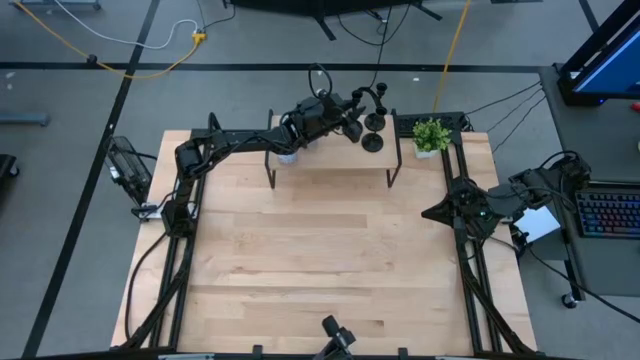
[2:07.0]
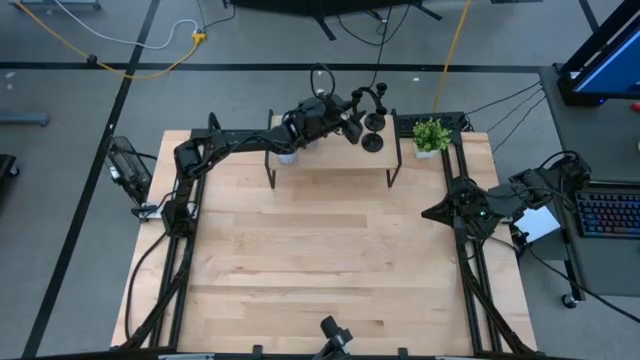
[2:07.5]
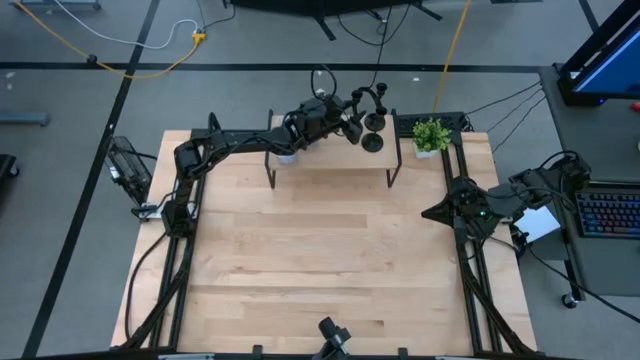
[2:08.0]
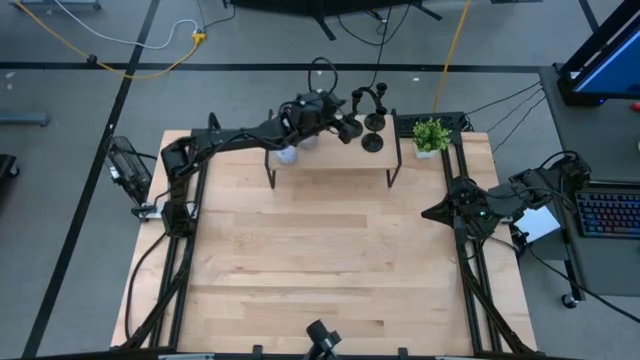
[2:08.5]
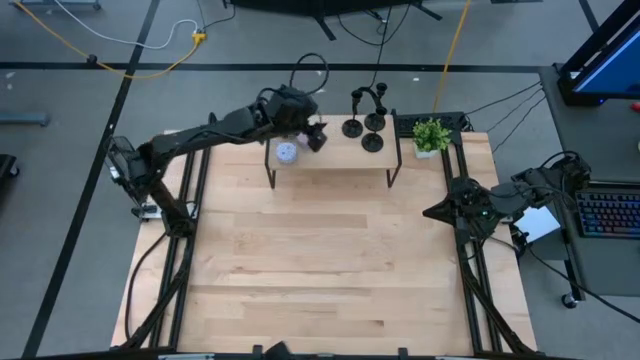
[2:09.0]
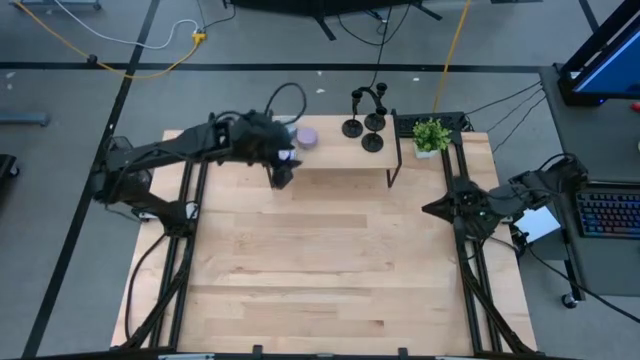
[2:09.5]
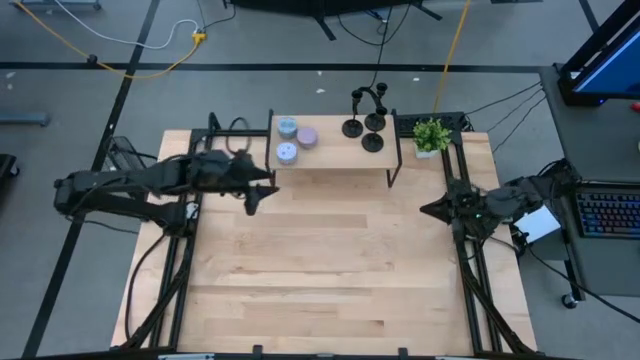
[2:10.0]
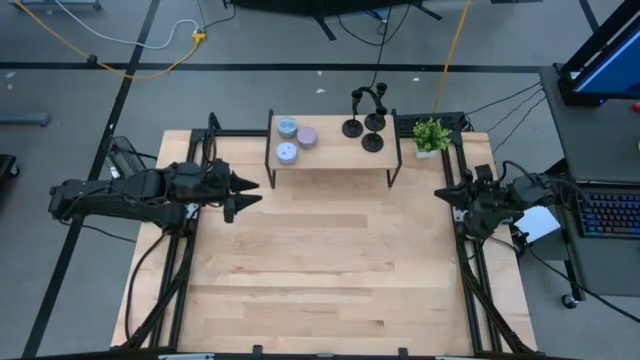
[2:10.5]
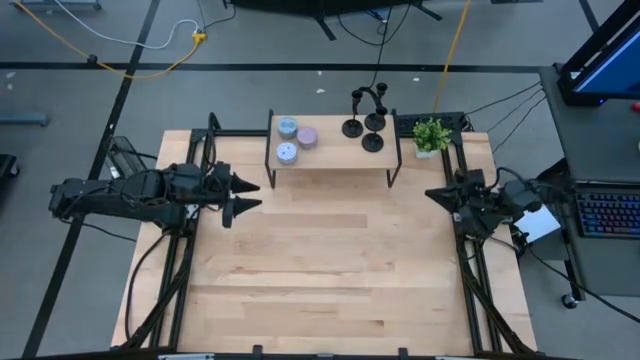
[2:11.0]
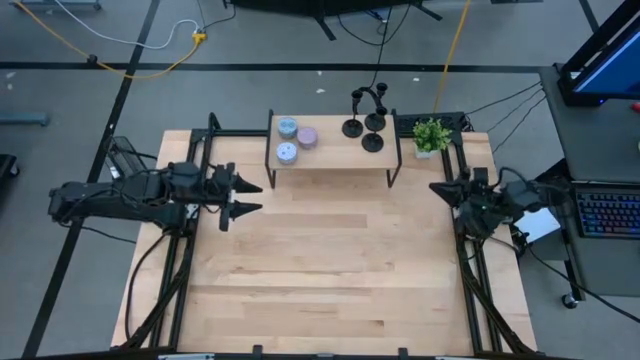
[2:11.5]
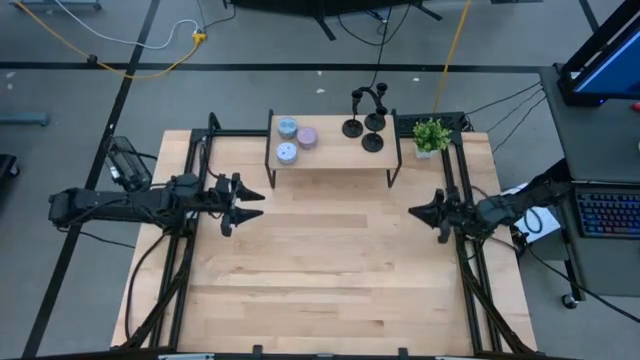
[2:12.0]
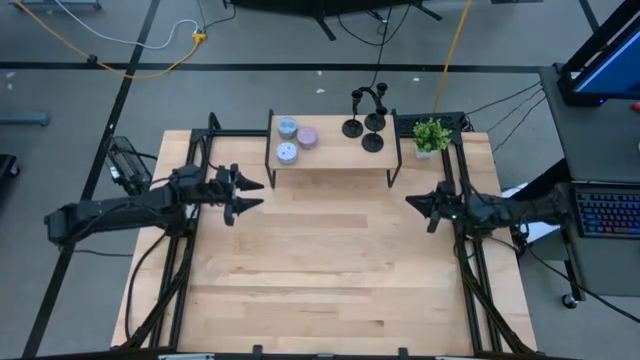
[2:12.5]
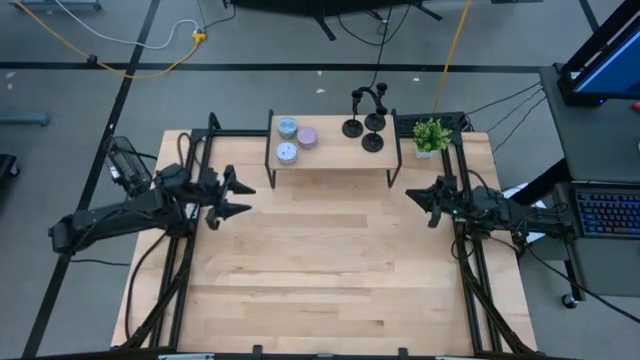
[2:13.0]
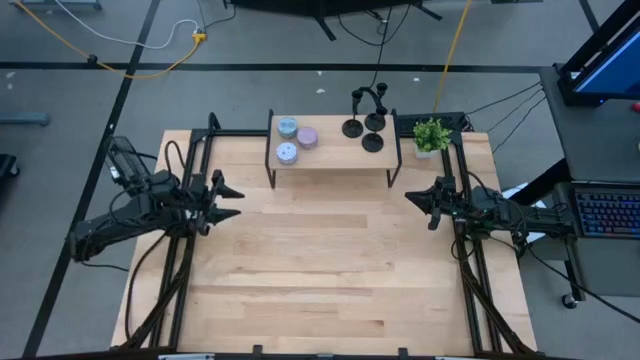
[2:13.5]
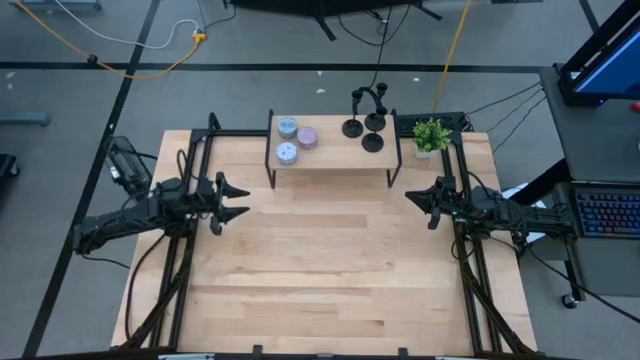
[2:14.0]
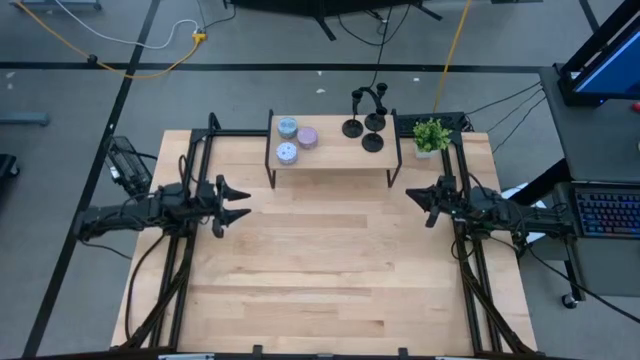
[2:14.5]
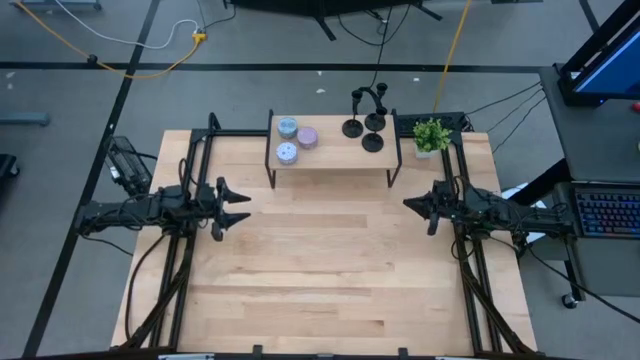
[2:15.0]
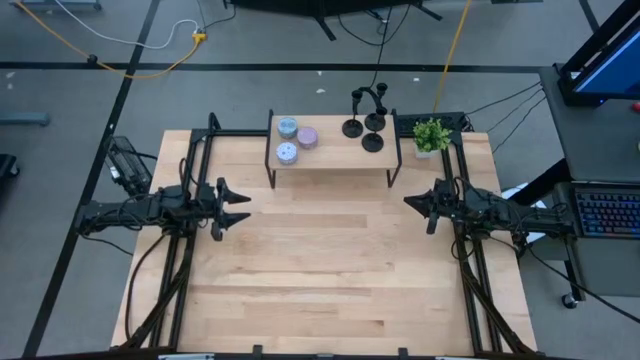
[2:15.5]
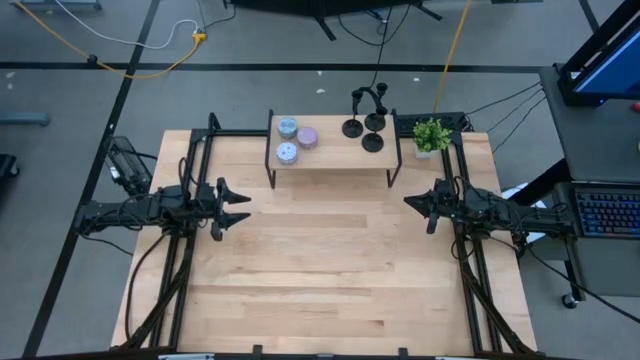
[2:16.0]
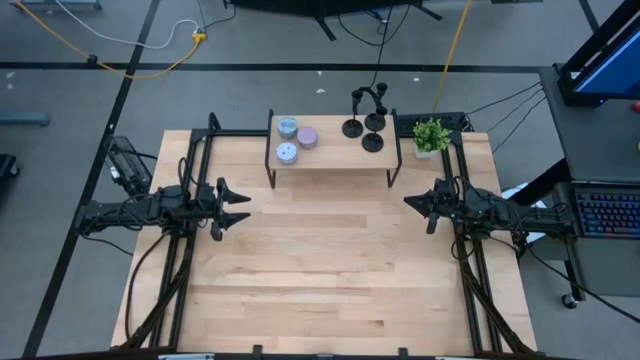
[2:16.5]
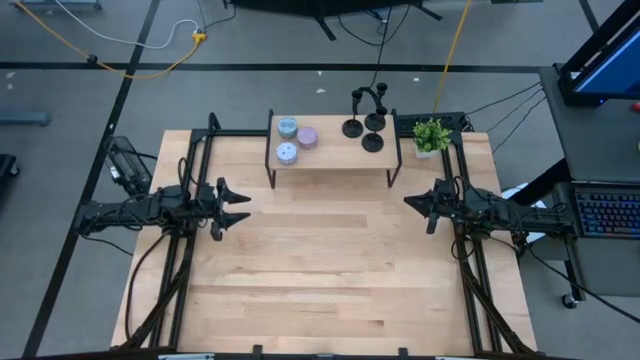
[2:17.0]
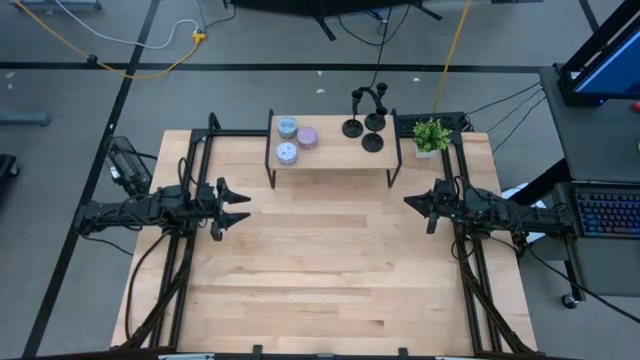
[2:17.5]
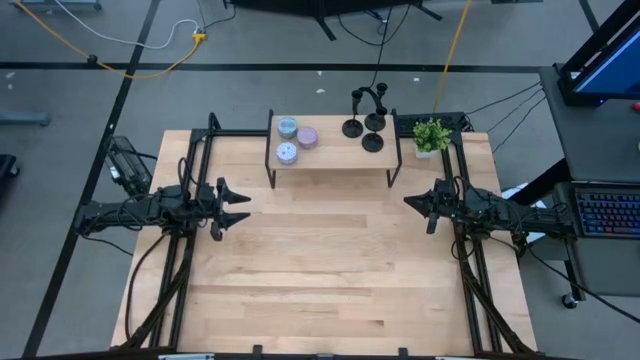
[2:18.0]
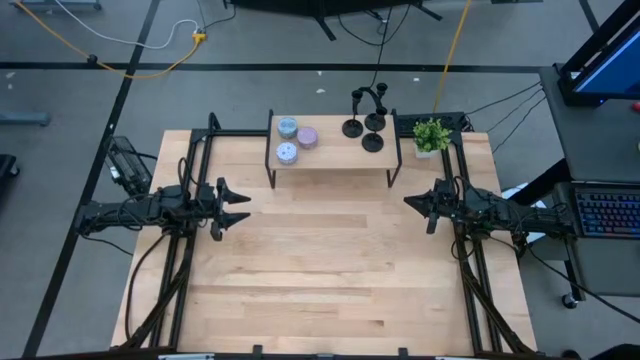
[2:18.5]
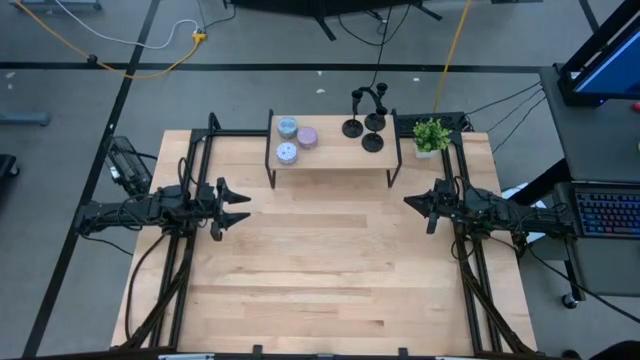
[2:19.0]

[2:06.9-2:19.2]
Task: Pick & Place candle stick holders
Return to Home Position

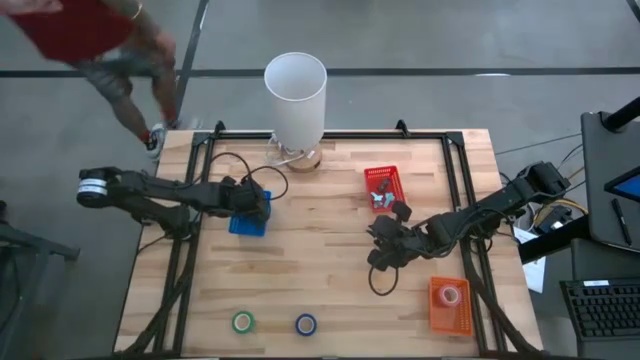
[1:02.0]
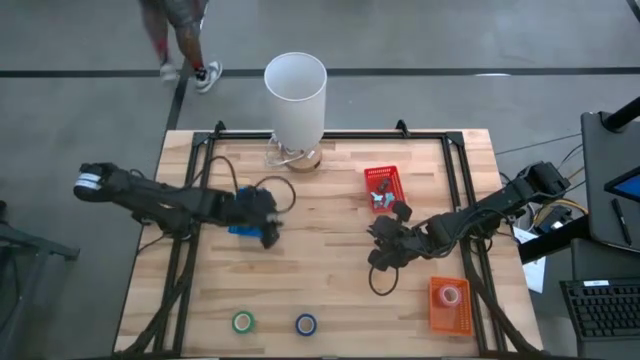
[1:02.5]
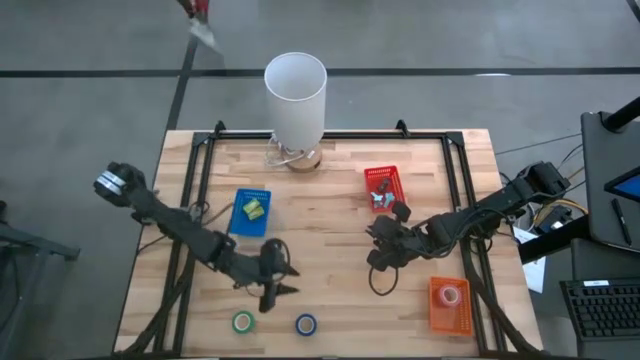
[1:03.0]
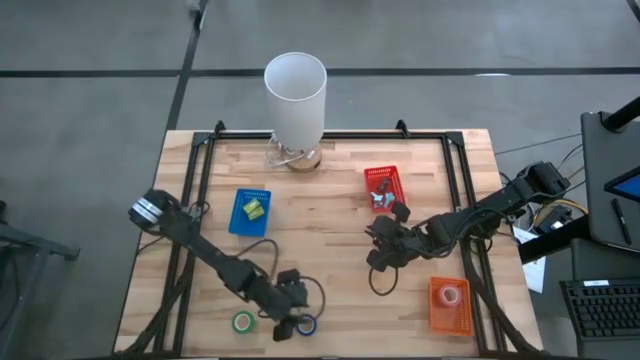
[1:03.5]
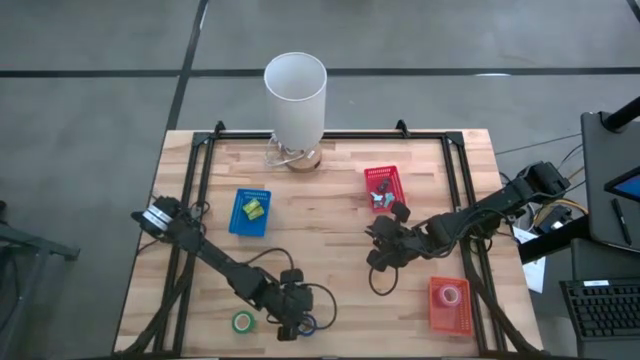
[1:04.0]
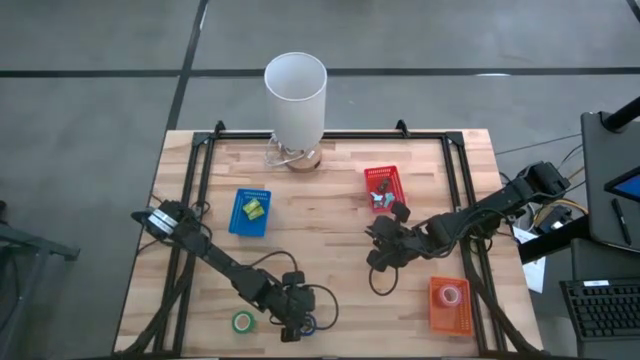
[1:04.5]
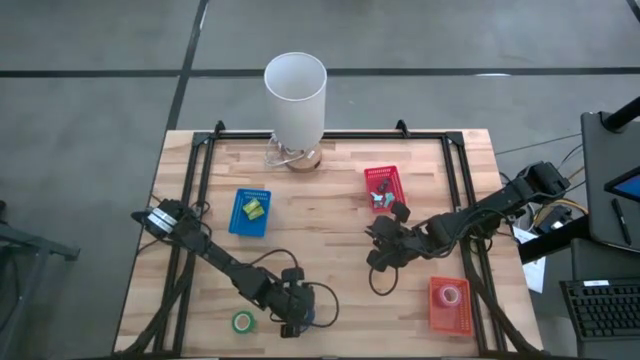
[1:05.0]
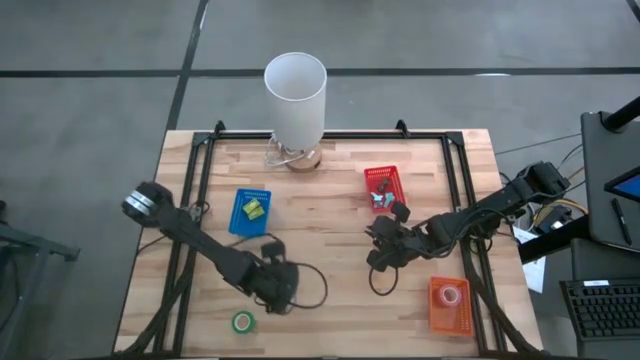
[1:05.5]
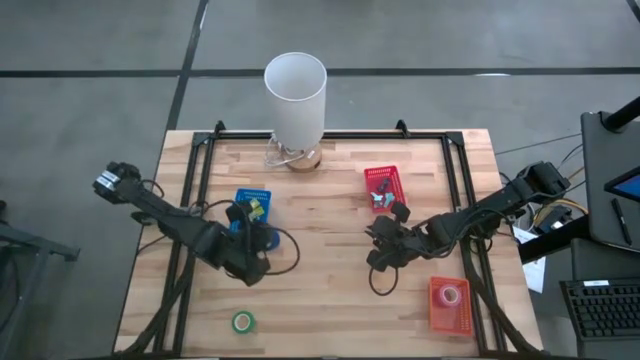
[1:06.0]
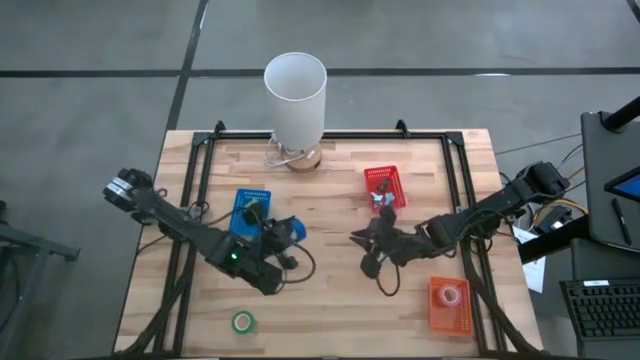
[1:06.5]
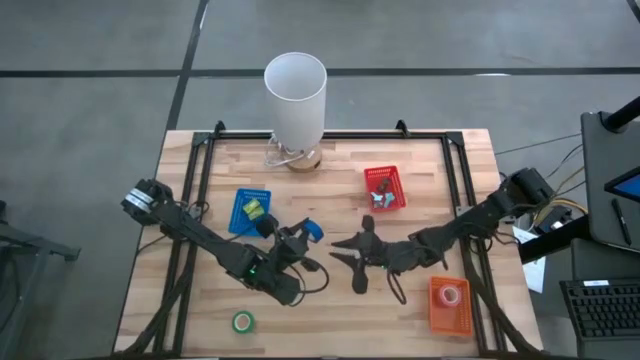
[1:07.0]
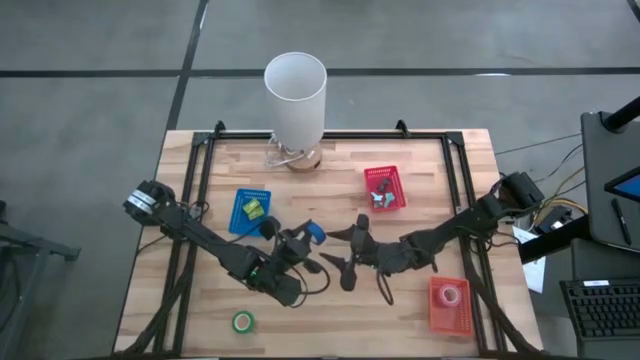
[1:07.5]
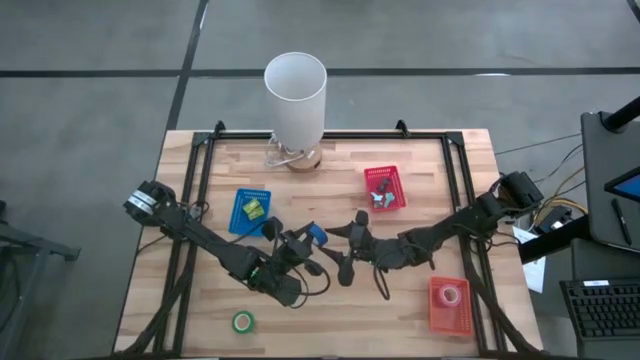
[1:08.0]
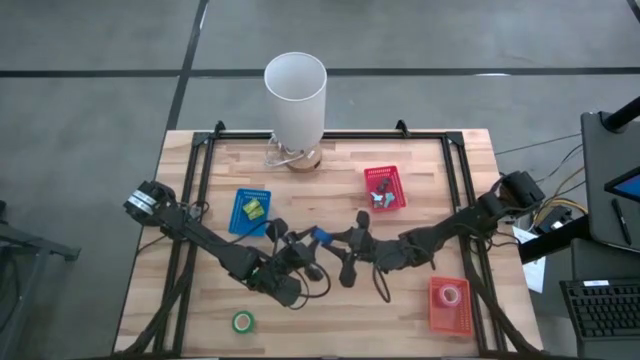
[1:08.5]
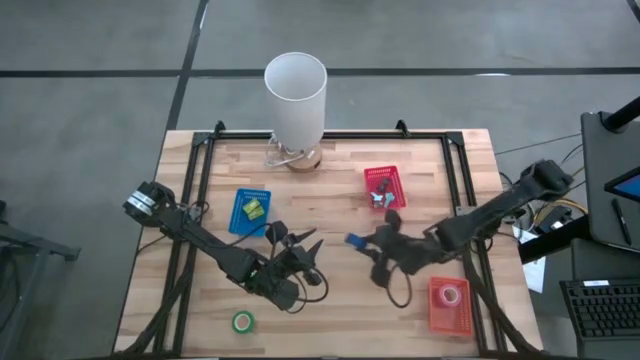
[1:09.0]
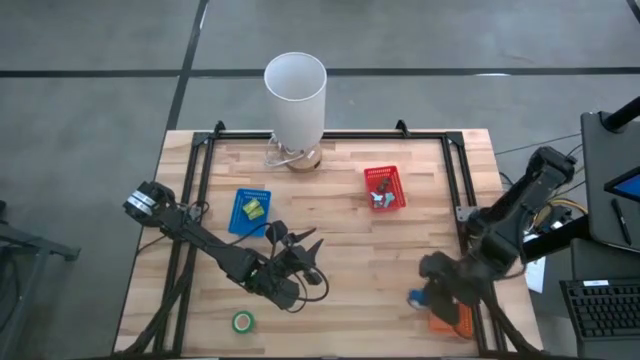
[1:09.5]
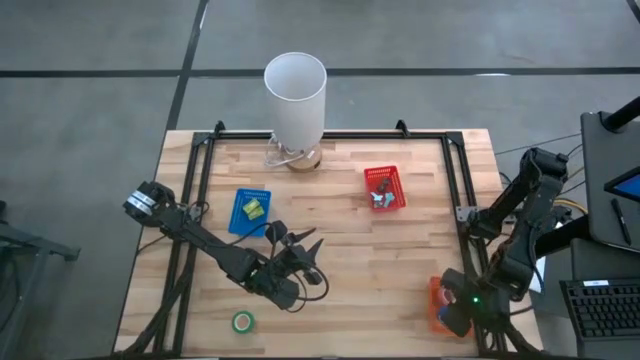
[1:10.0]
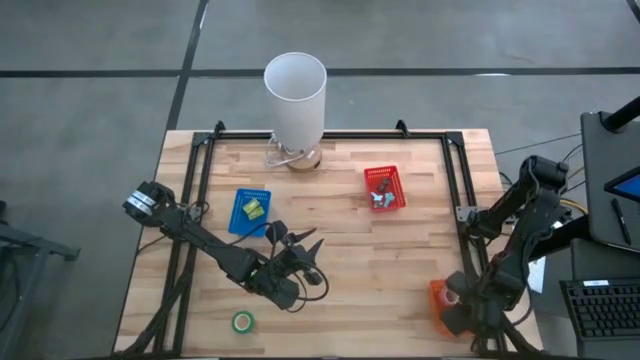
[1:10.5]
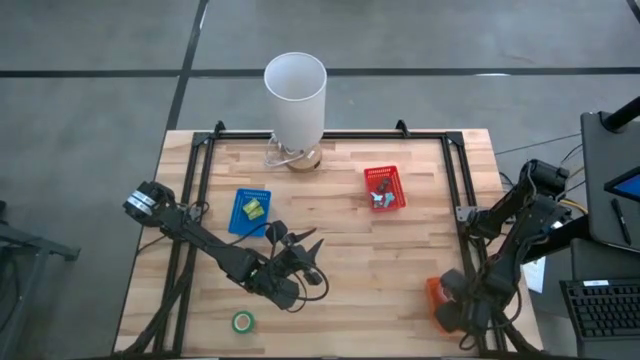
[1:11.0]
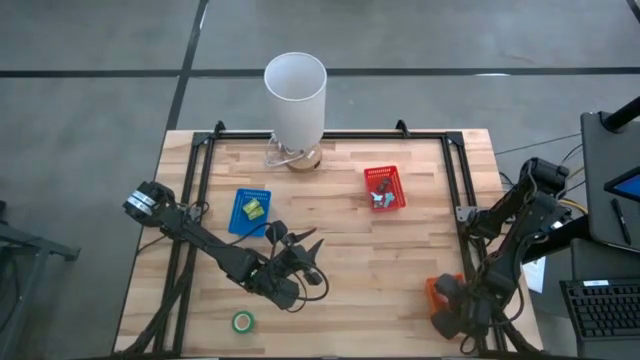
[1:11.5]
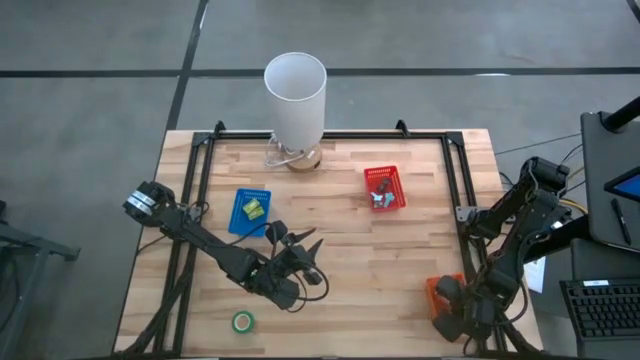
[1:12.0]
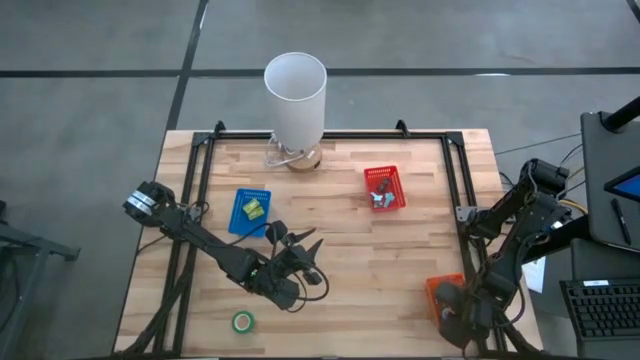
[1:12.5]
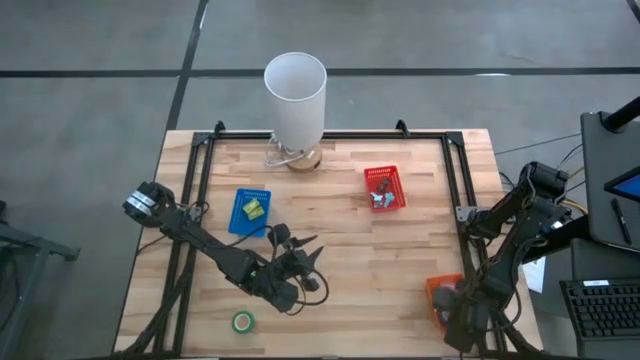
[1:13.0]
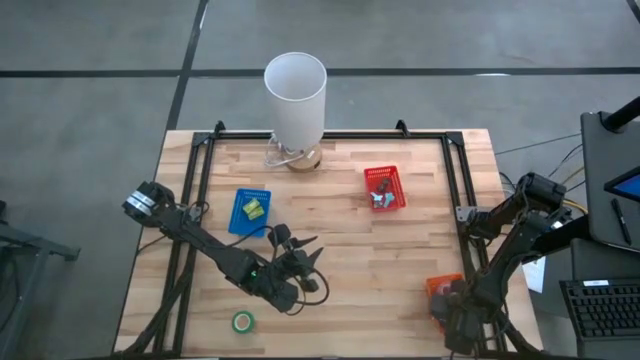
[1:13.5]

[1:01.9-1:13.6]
Task: Pick and place Stapler, Stapler remover, tape
Put the blue tape into the orange basket
